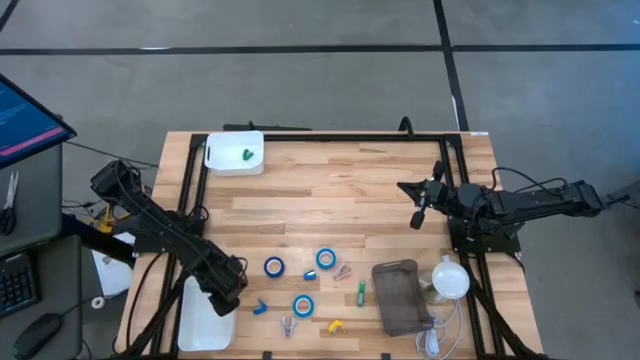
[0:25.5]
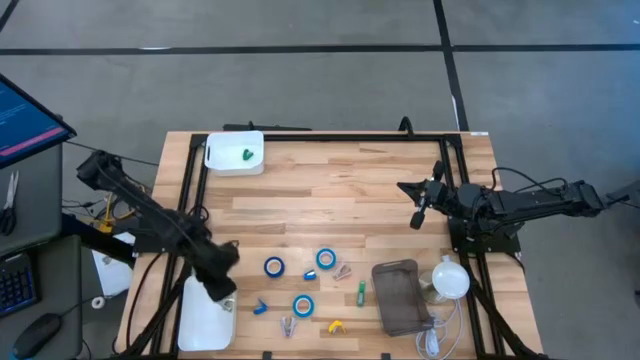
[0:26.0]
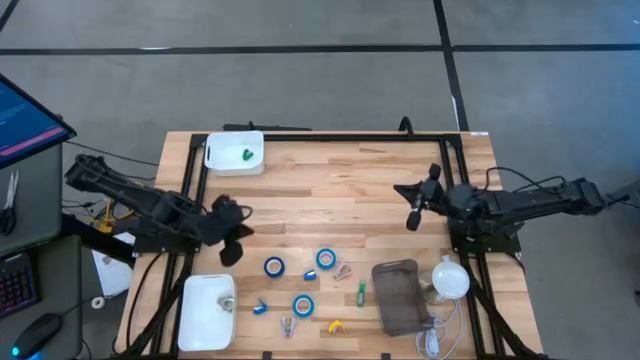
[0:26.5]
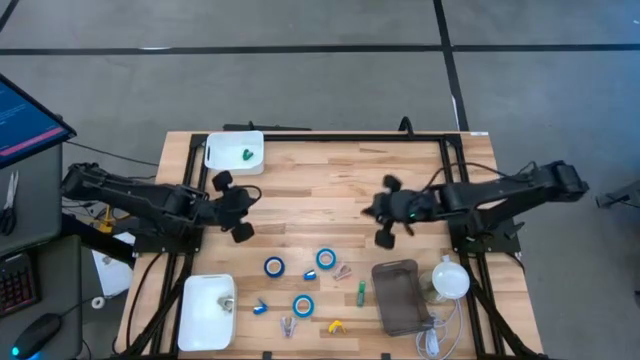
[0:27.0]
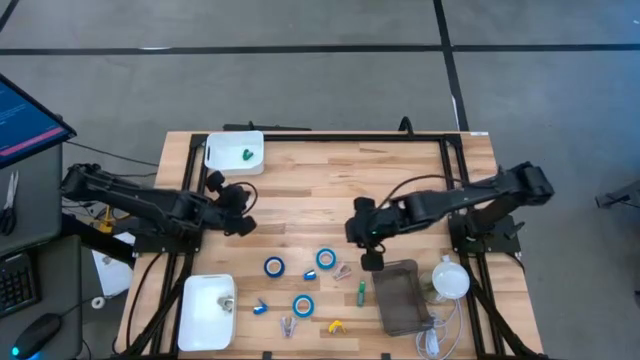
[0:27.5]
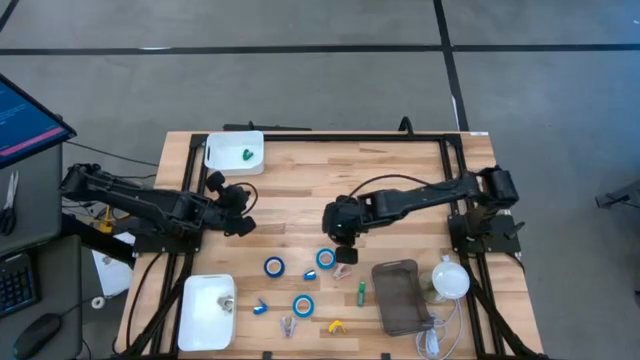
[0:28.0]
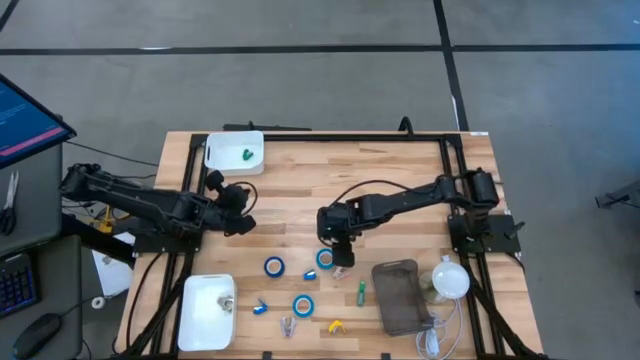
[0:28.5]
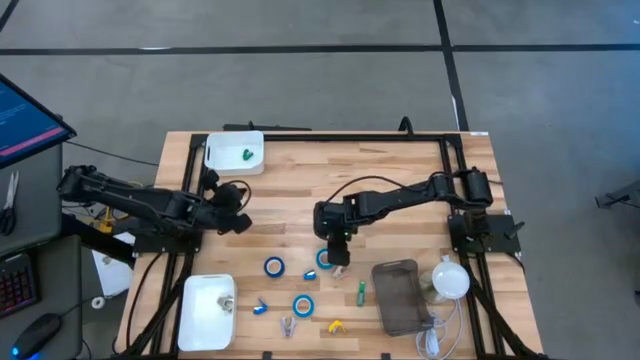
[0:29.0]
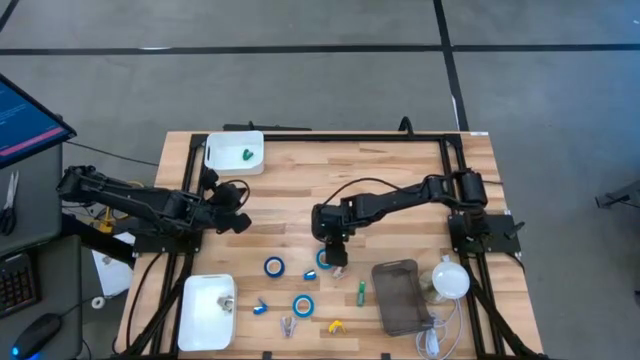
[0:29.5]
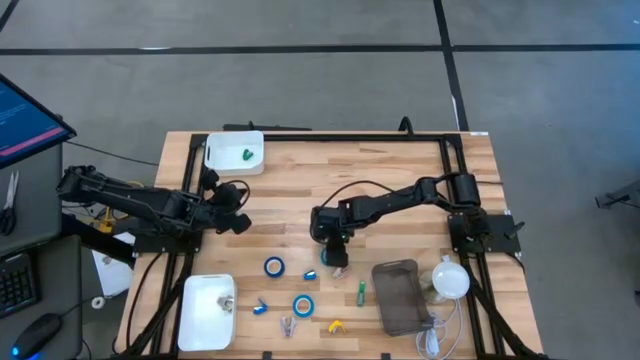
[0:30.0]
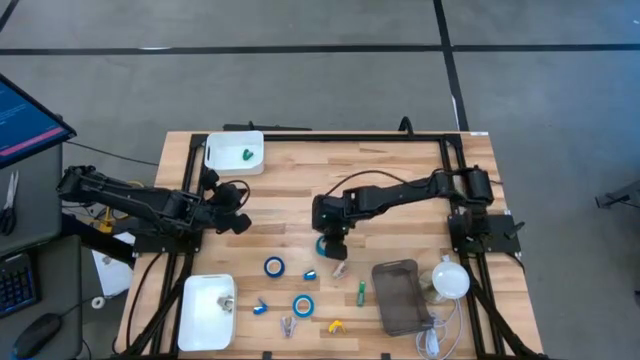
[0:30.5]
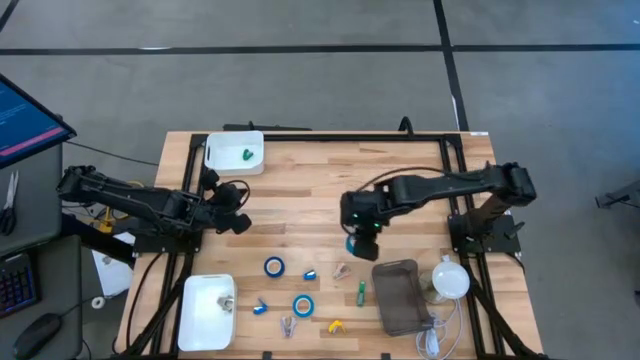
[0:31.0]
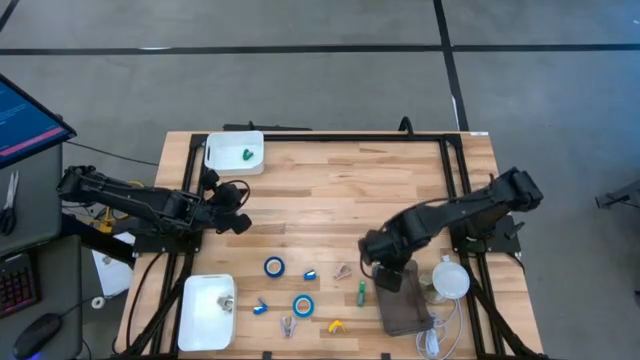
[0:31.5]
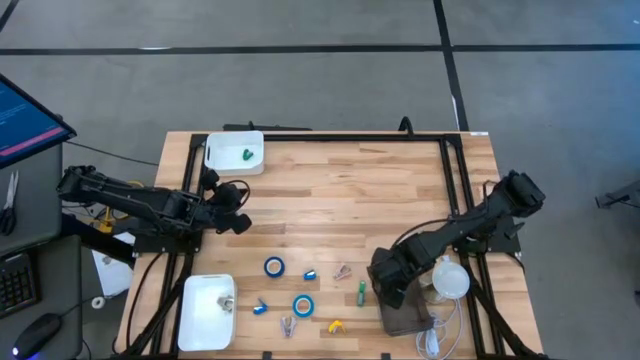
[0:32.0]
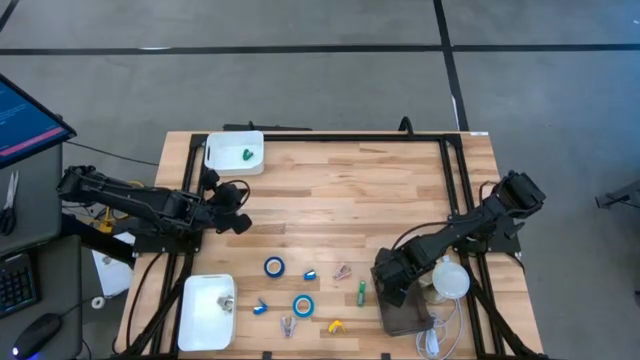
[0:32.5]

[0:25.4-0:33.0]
Task: Pick and place Stapler, Stapler remover, tape
Put the top light blue tape into the black bin

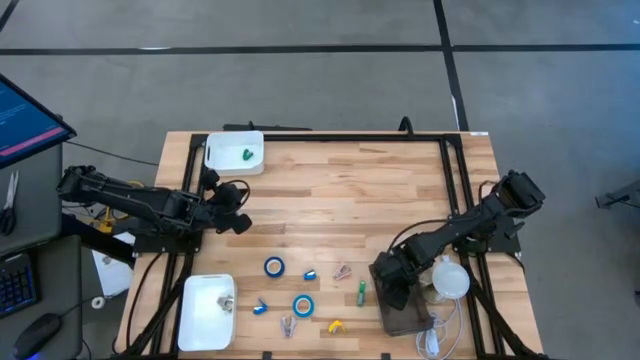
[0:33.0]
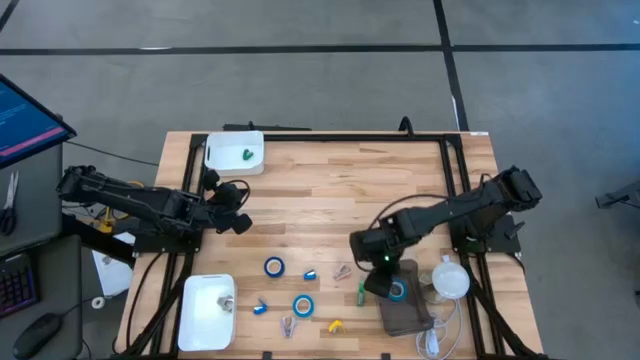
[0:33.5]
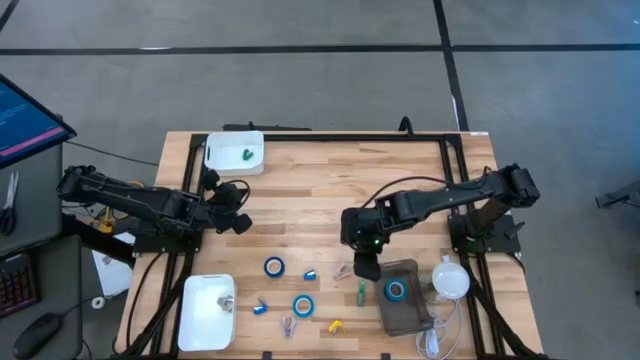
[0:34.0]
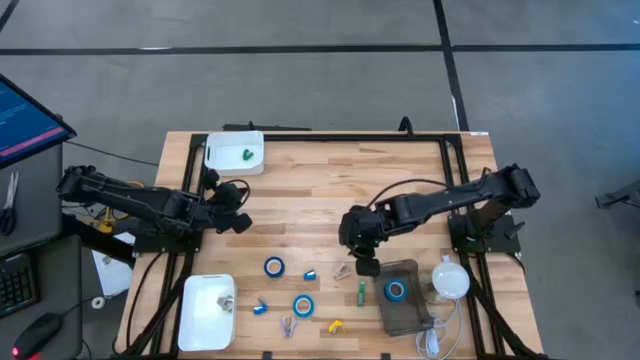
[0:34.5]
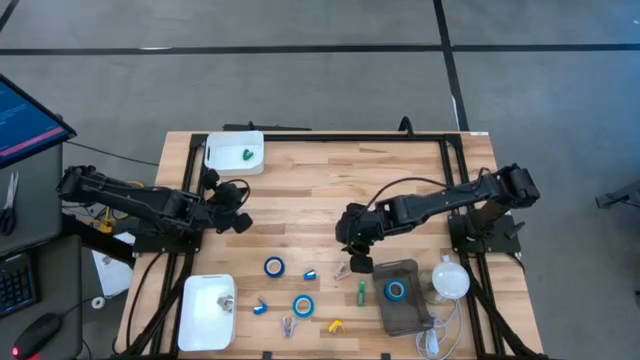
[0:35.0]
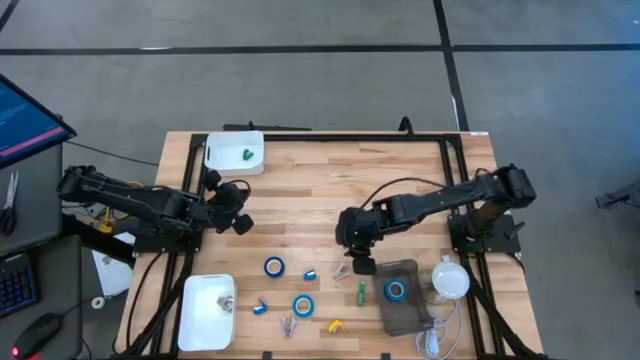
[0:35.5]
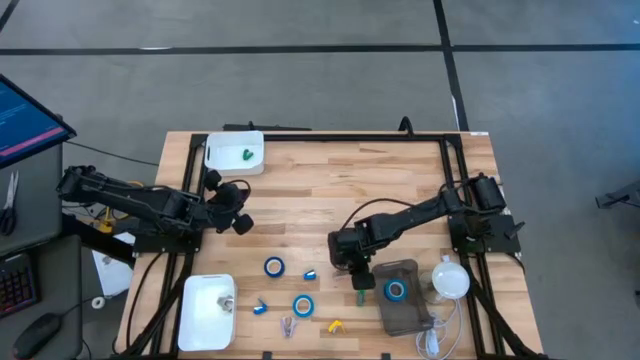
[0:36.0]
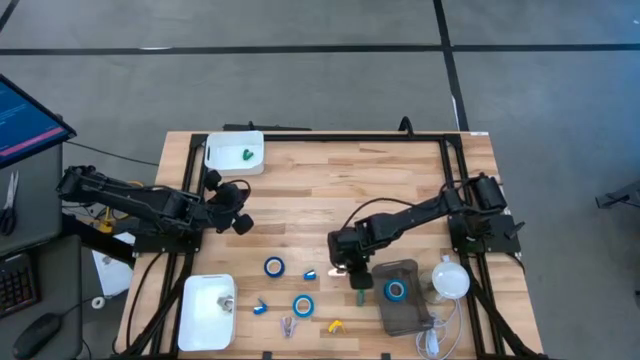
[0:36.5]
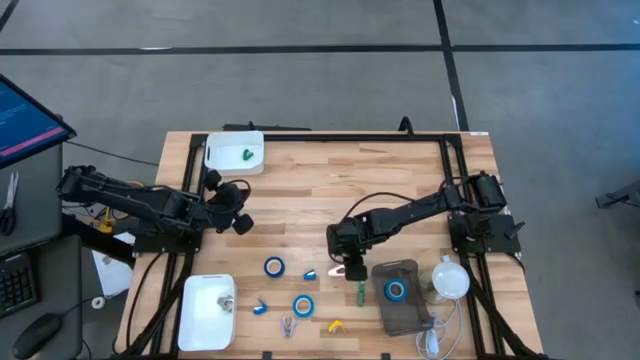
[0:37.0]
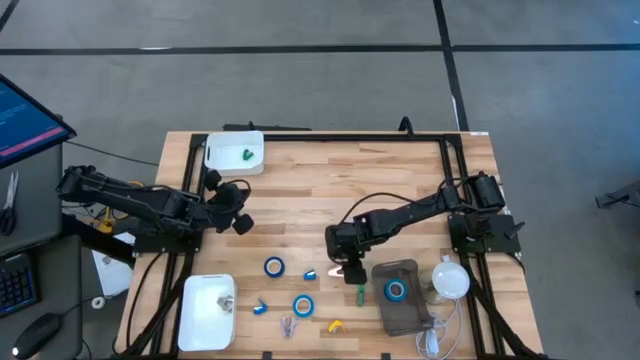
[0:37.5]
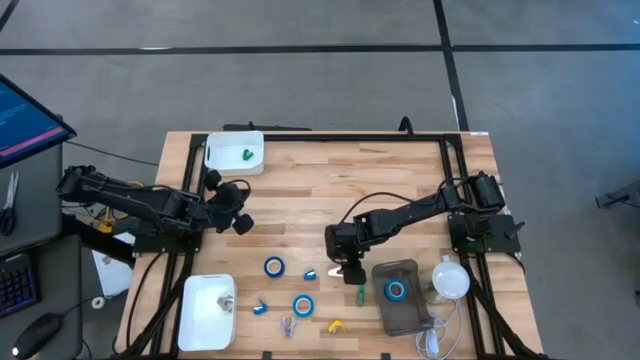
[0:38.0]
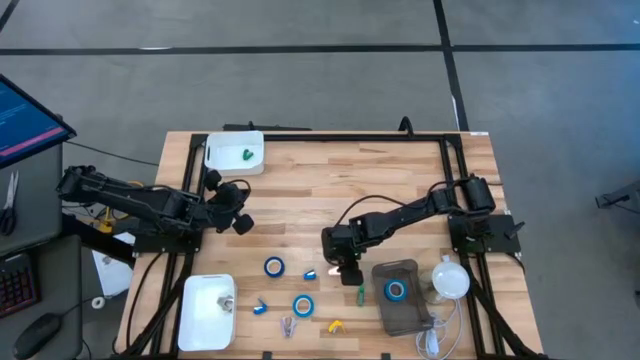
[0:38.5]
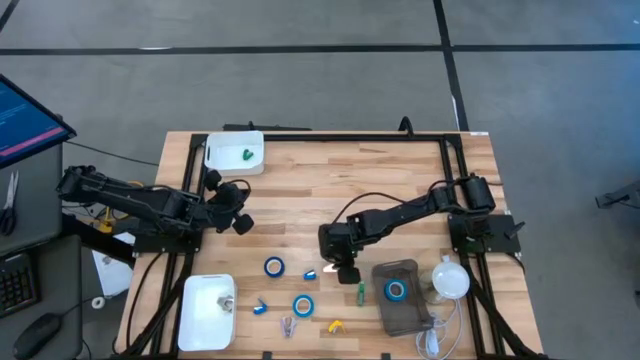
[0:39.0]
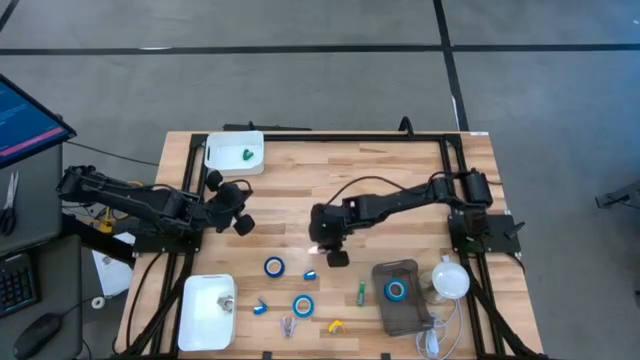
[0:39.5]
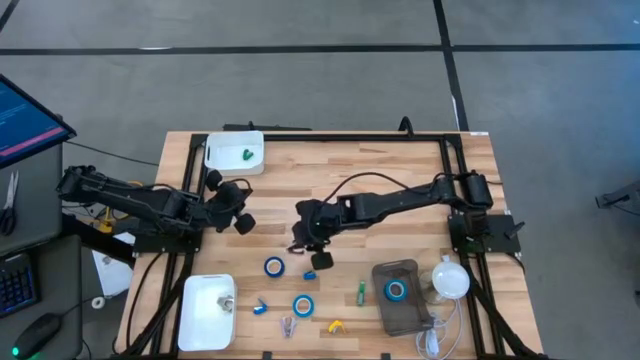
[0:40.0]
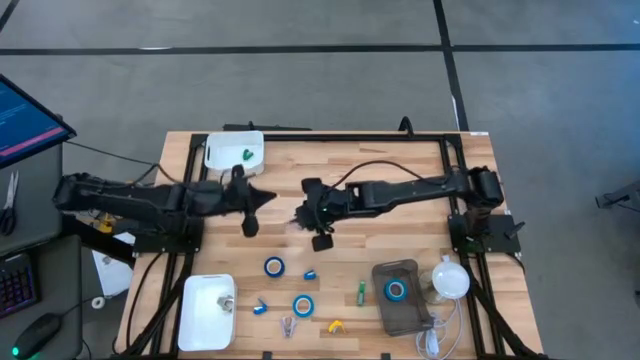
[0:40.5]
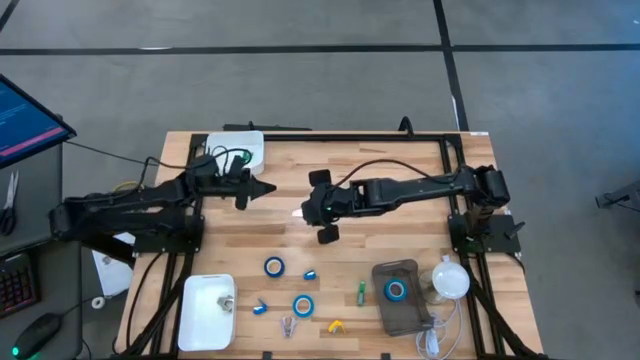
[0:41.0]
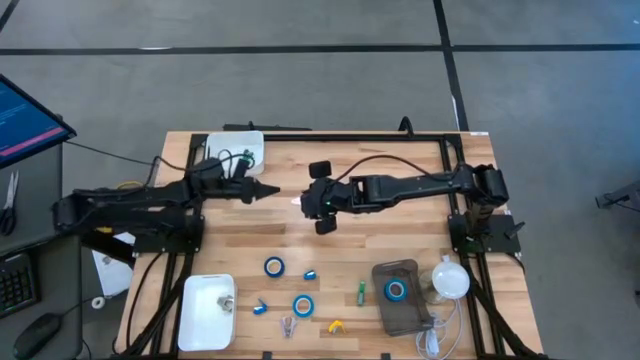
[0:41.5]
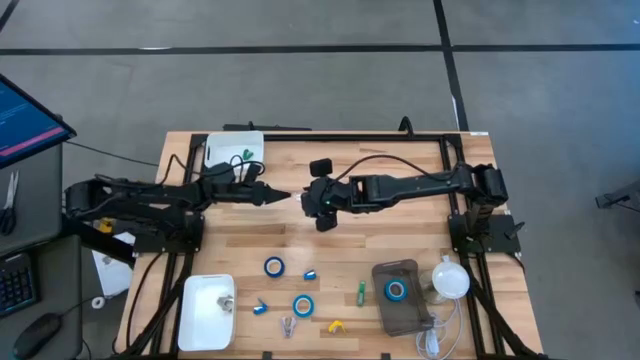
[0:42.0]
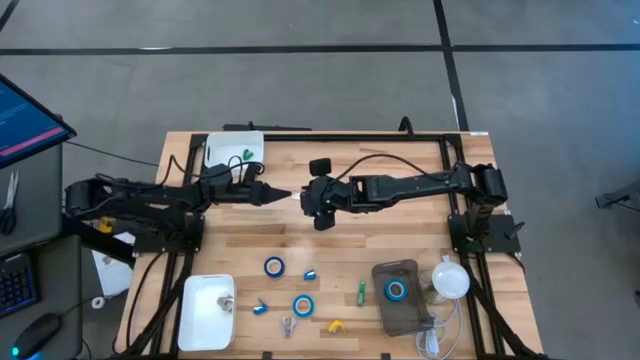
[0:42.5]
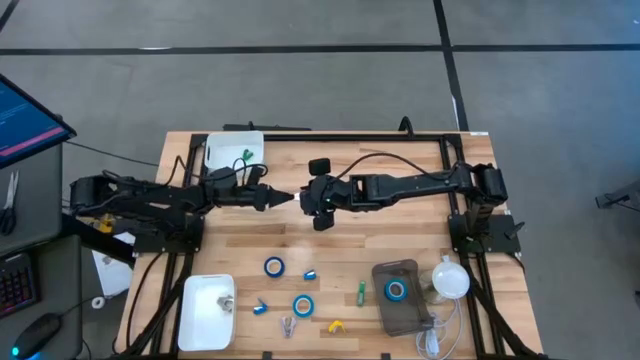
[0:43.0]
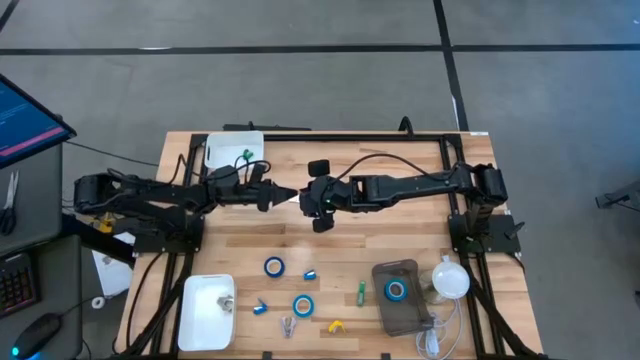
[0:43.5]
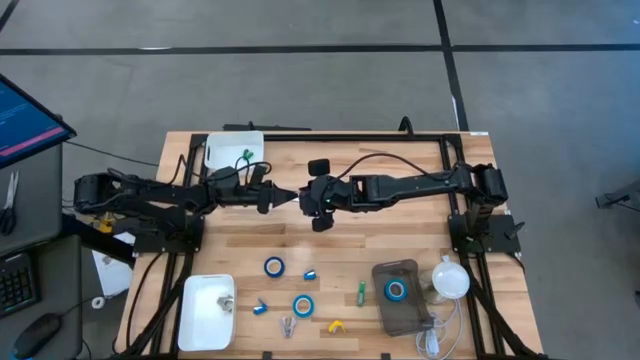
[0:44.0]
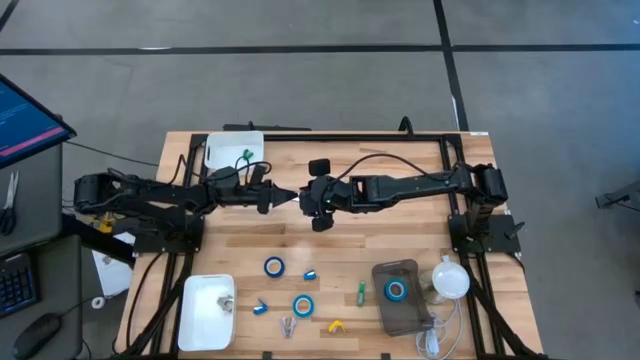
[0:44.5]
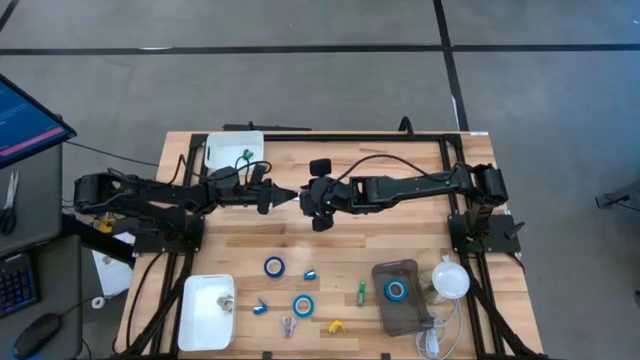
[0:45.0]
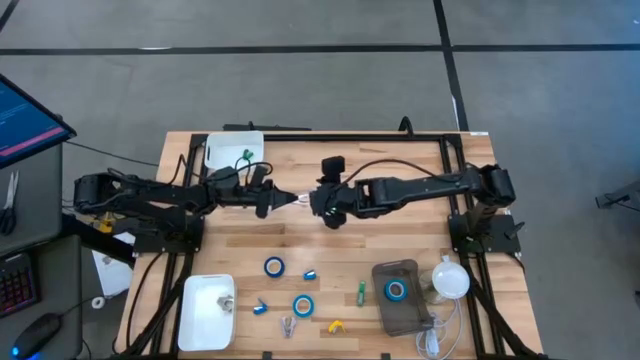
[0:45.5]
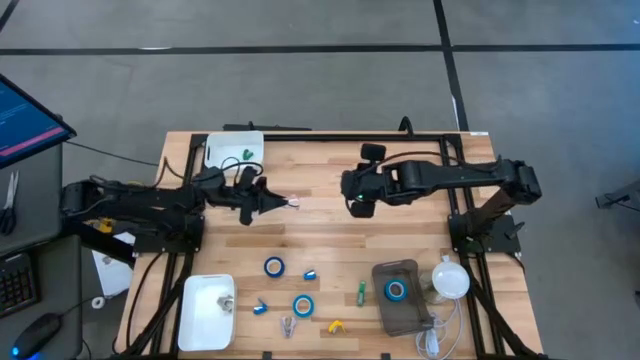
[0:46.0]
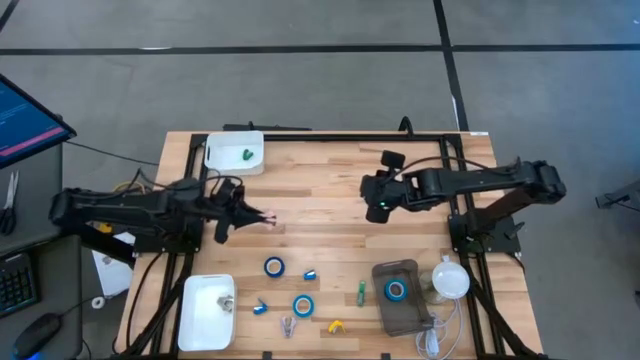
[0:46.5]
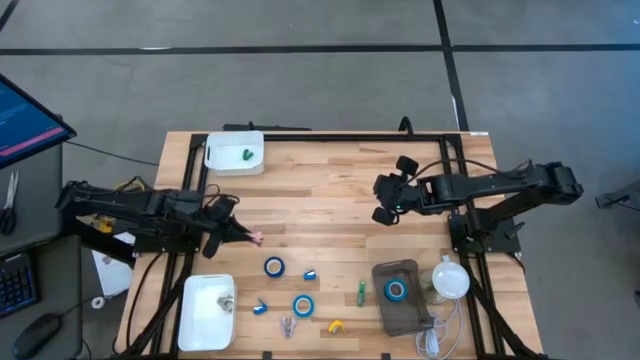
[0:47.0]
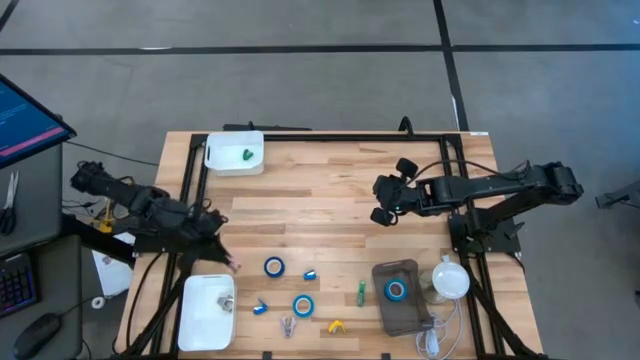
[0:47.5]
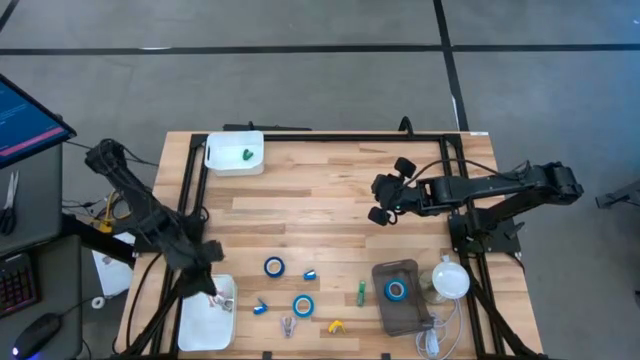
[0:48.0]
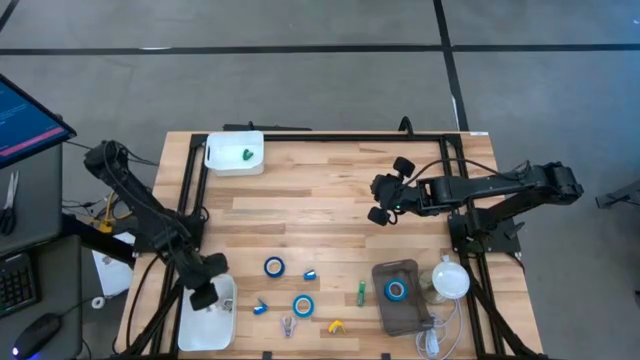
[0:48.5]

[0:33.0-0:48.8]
Put the pink staple remover into the bottom white bin
